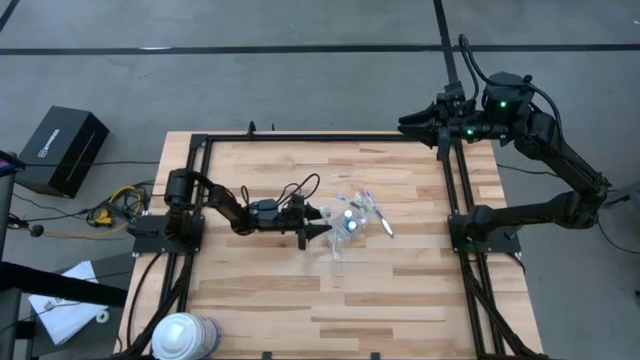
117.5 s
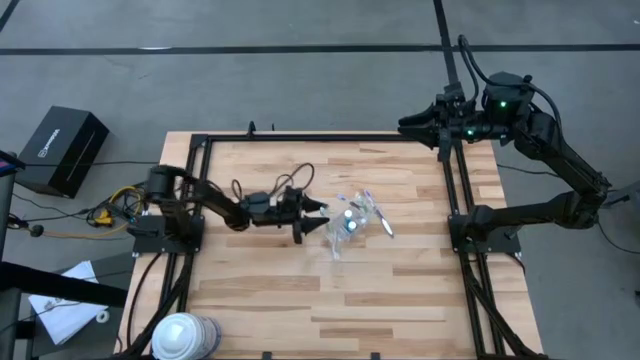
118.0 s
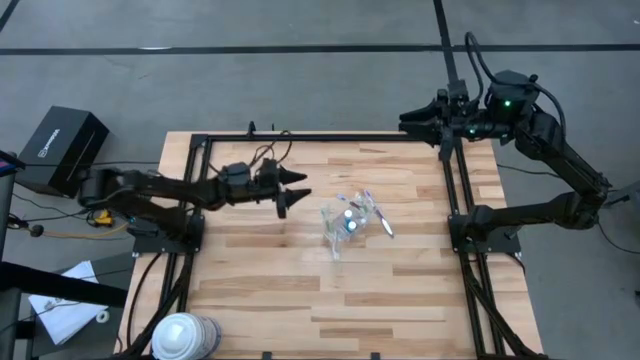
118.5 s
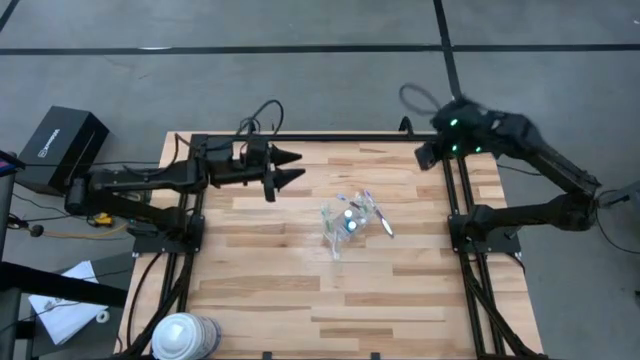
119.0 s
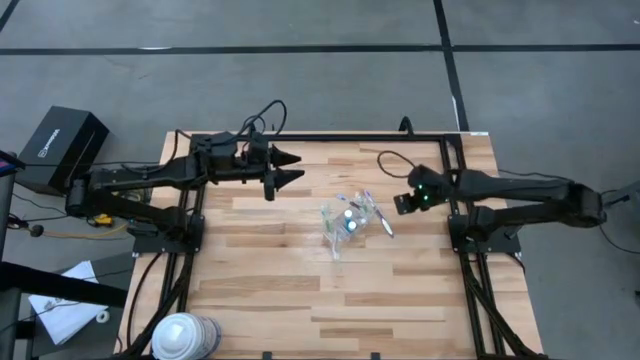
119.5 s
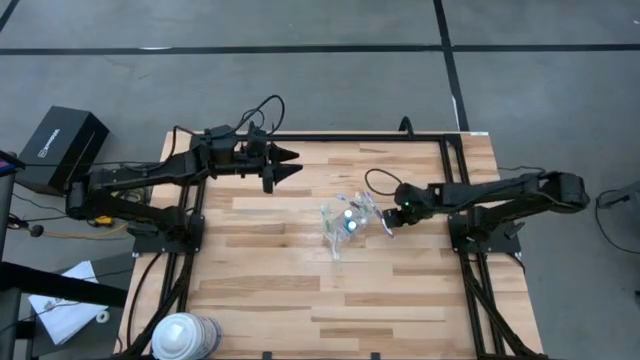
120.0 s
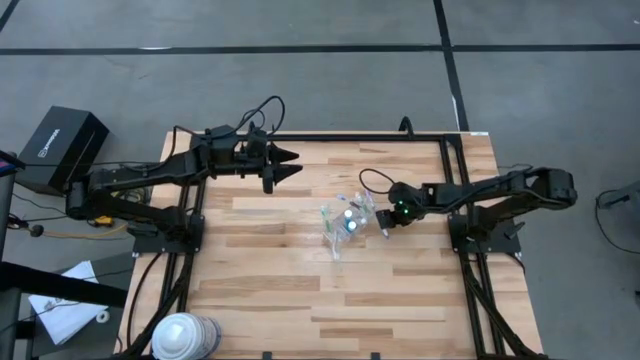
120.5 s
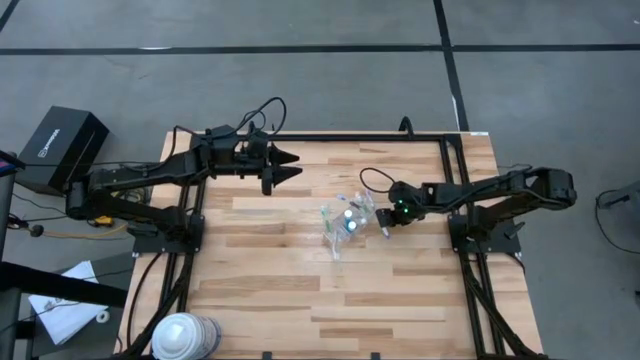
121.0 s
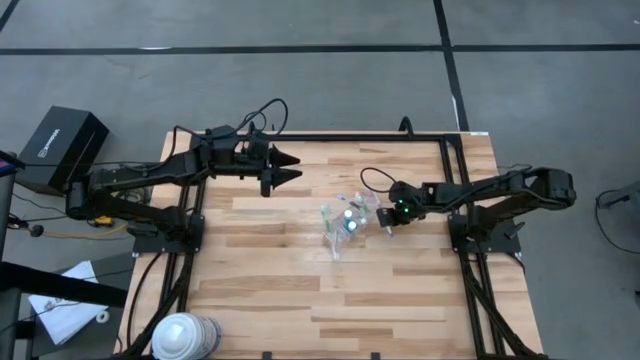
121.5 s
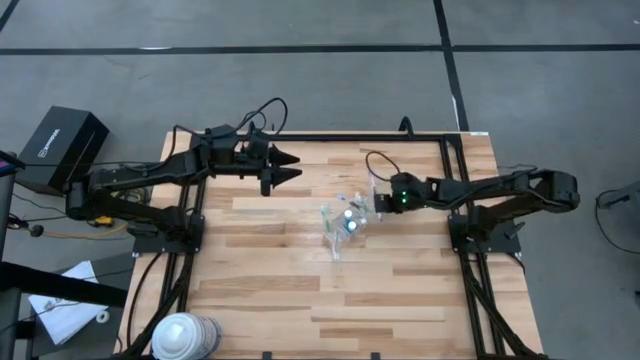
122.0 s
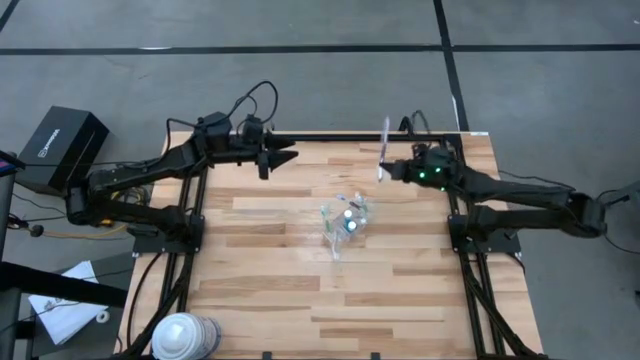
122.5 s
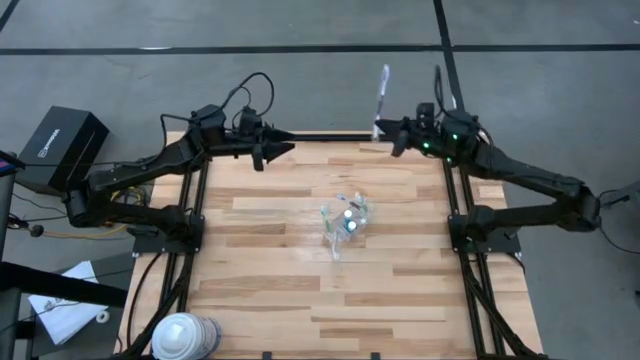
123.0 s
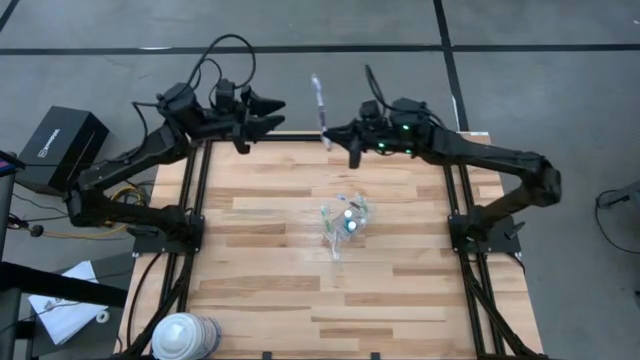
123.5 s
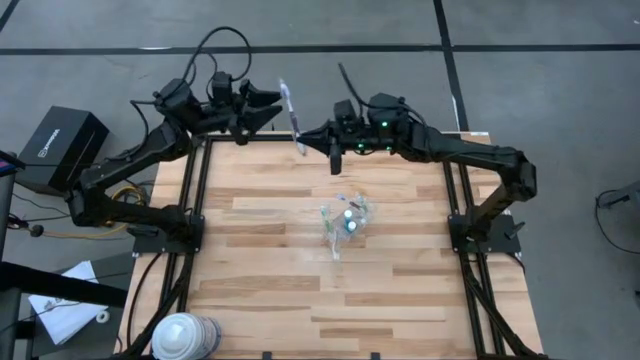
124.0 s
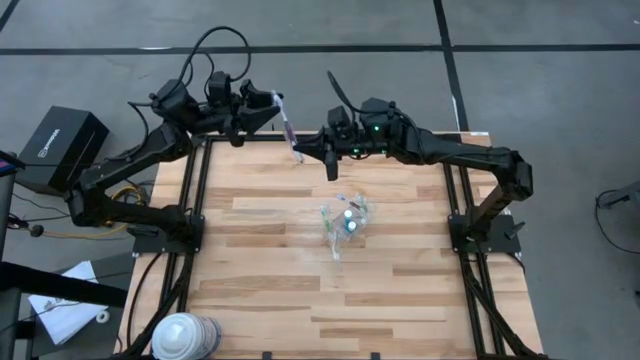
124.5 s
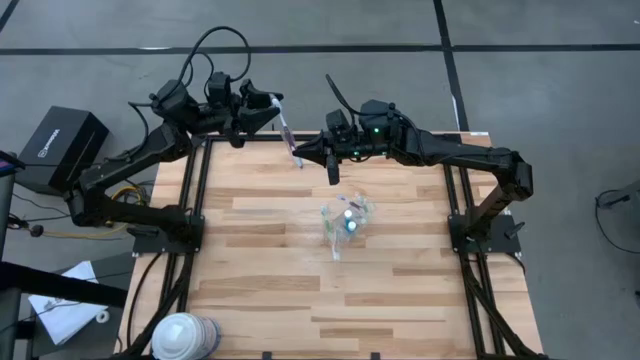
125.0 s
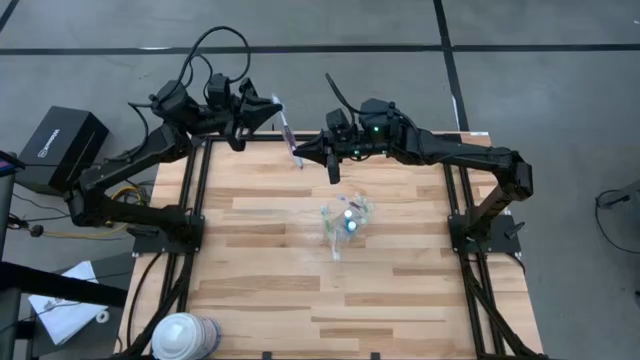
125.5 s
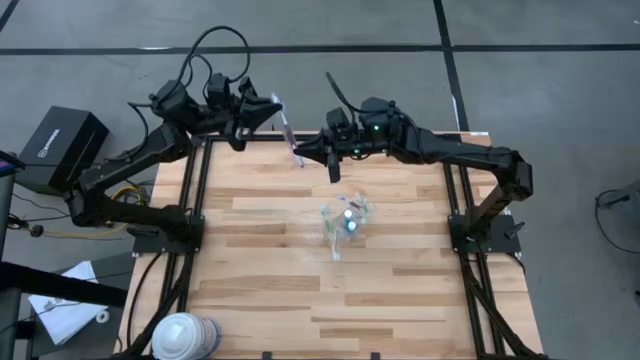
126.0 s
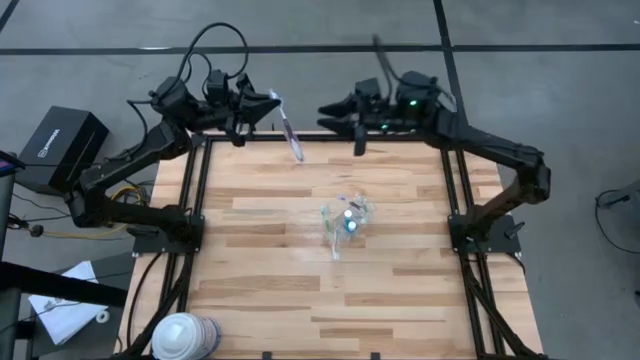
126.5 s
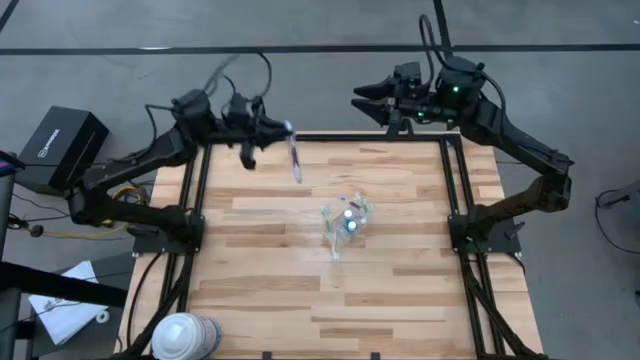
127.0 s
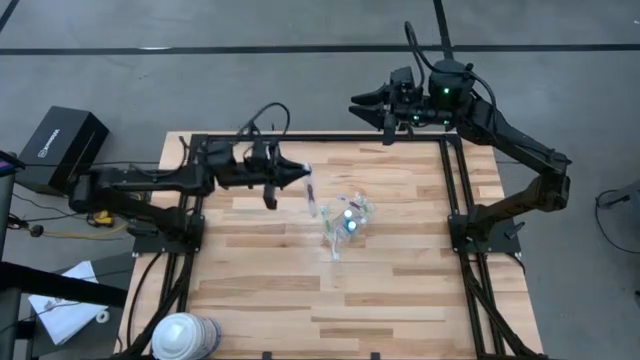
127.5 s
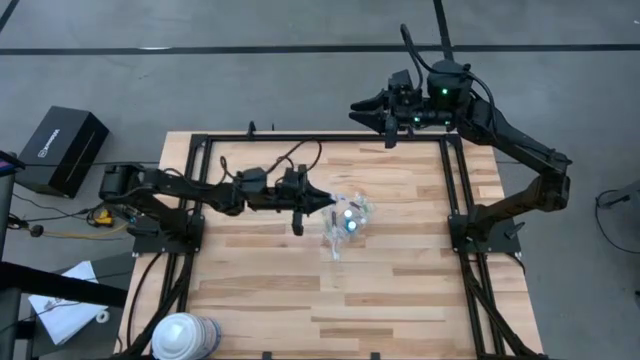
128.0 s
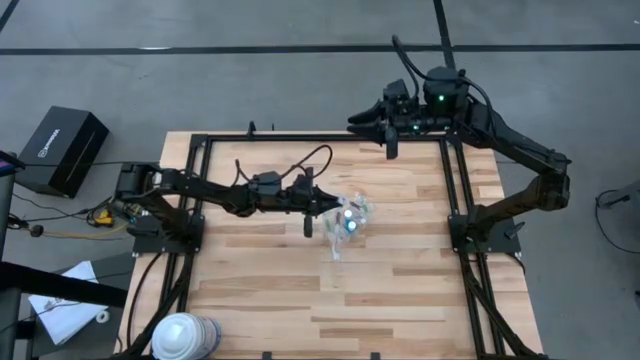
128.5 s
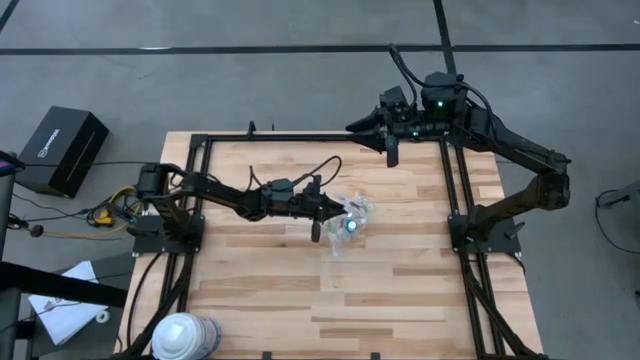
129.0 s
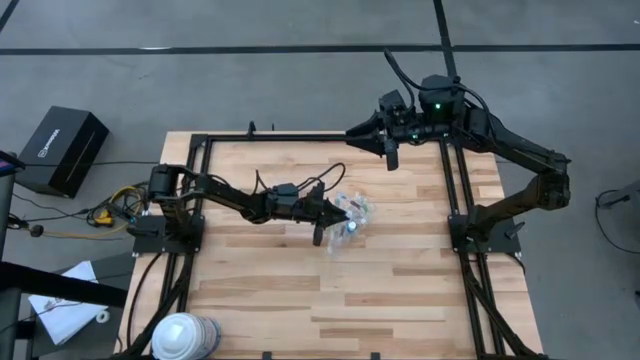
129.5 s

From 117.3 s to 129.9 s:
Task: Pick & Place toothbrushing station
Put the purple toothbrush into the transparent organizer

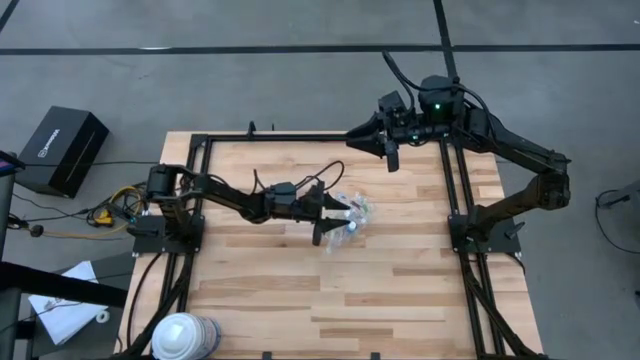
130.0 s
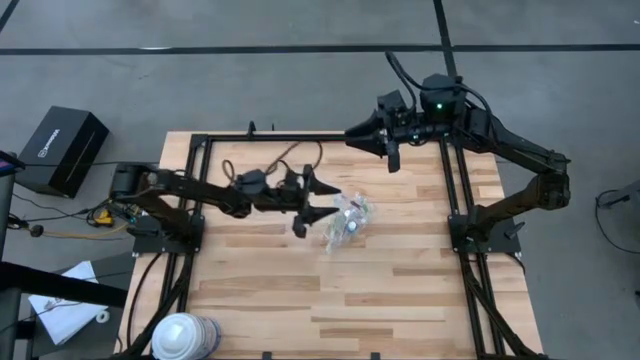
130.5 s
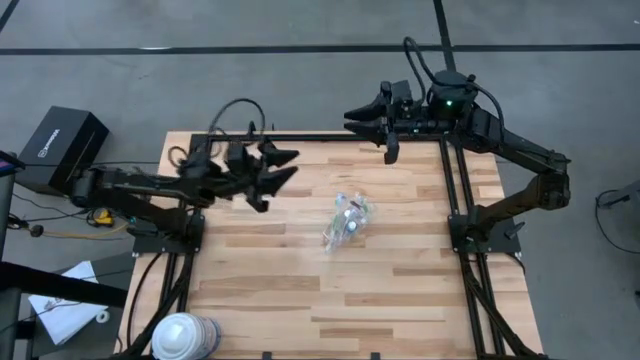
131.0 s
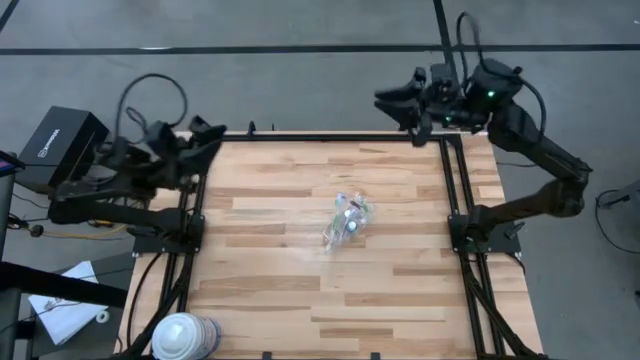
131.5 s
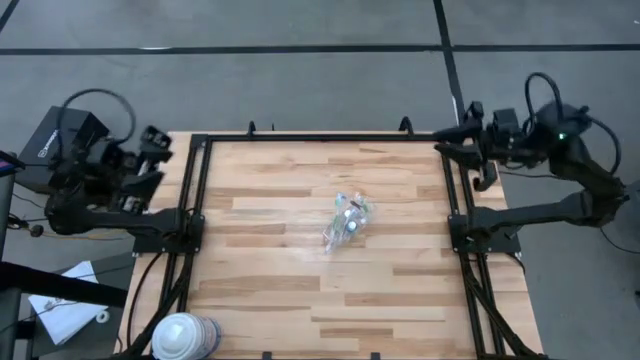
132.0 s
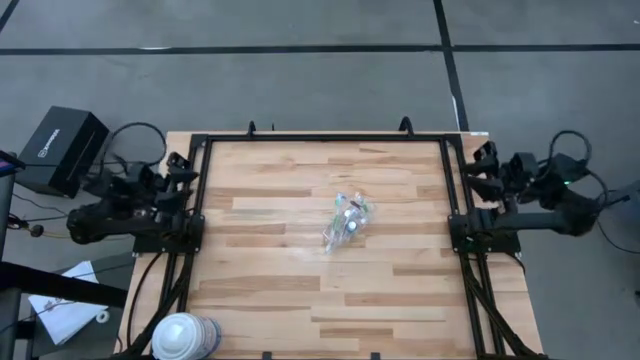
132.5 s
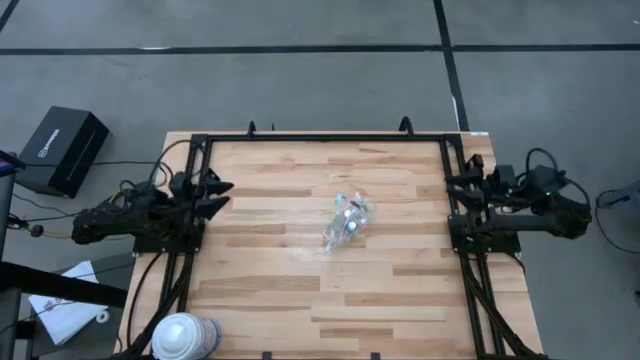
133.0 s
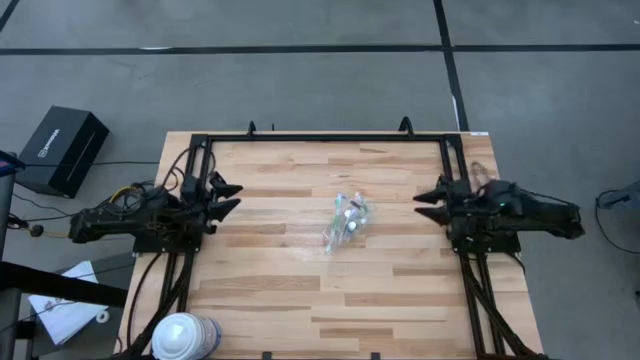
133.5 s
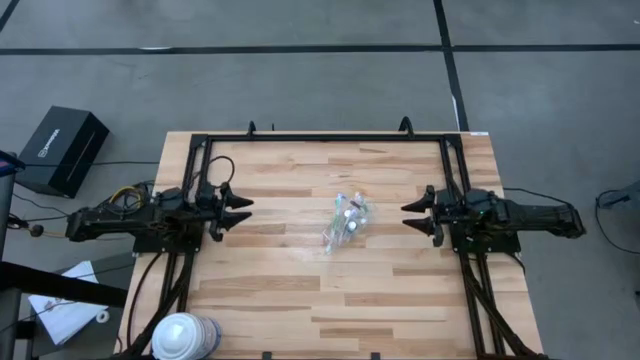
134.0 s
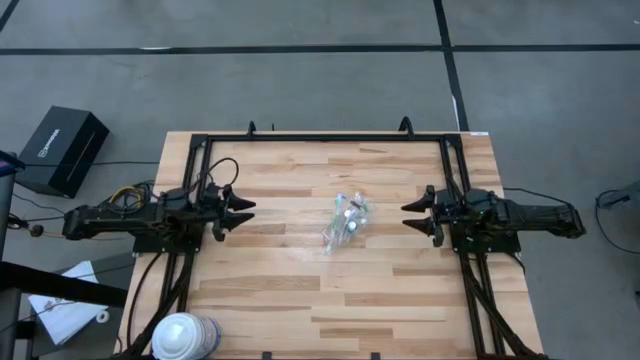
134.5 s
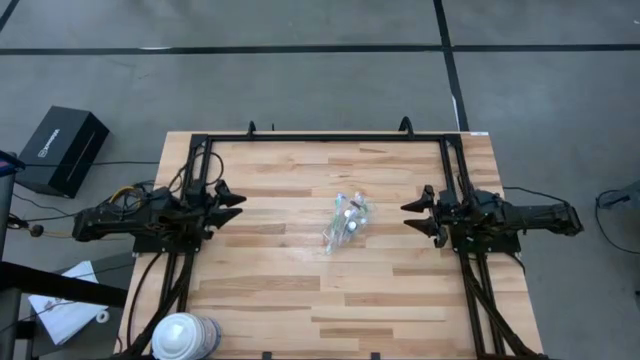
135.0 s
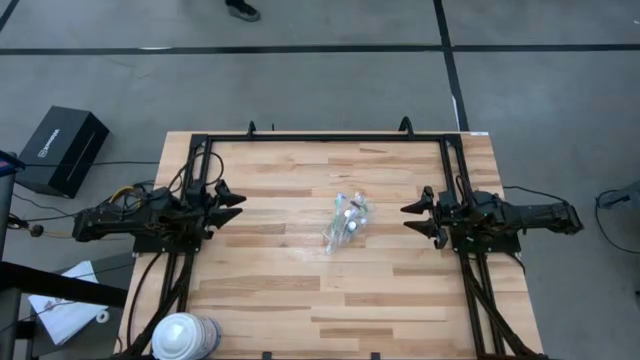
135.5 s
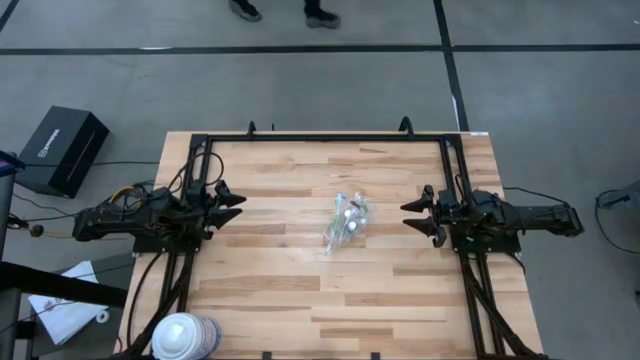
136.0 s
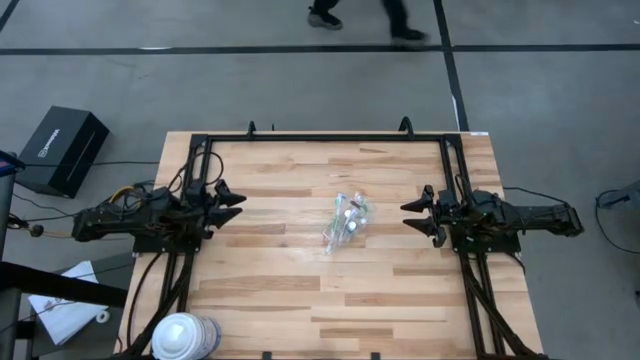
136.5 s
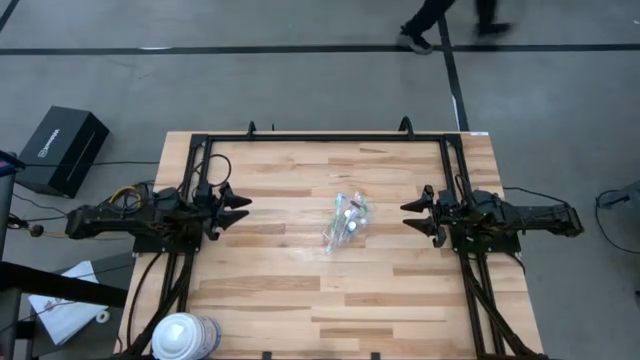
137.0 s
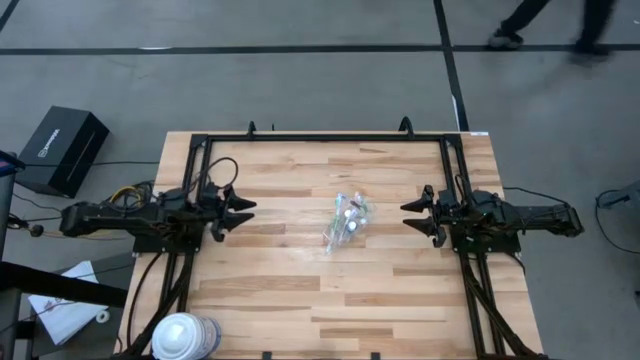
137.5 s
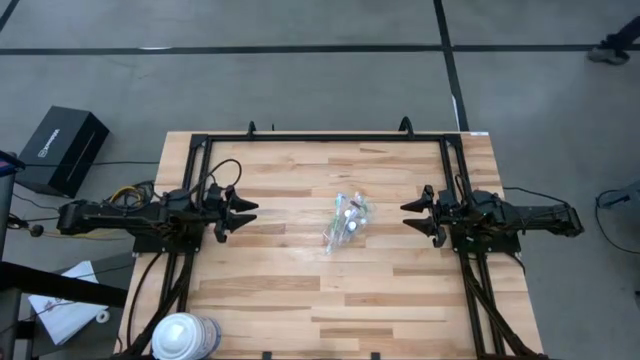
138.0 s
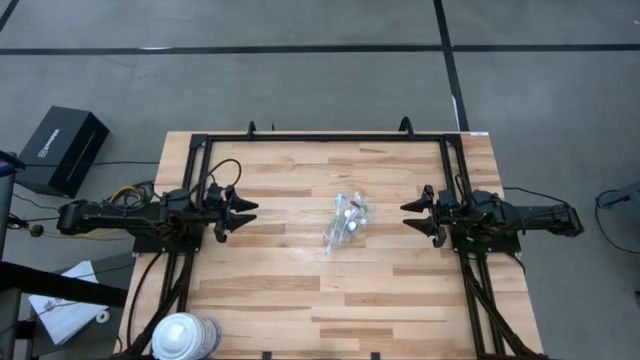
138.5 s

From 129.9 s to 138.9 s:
Return to Home Position
